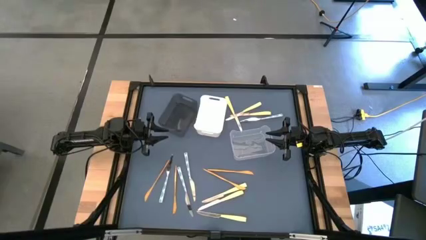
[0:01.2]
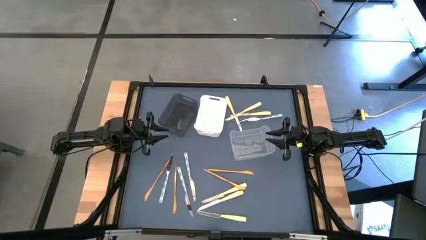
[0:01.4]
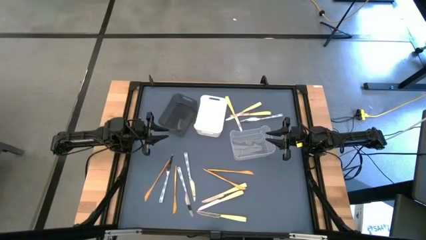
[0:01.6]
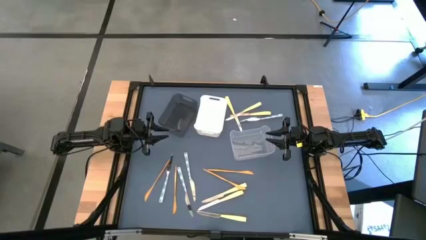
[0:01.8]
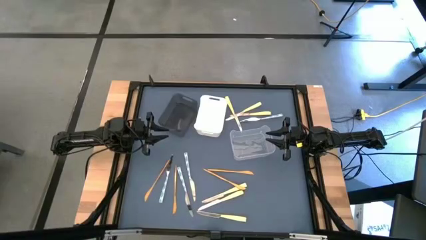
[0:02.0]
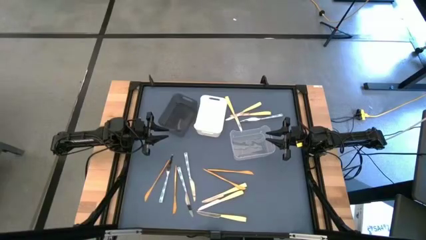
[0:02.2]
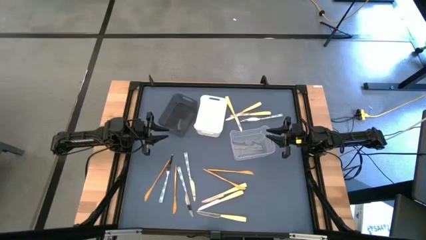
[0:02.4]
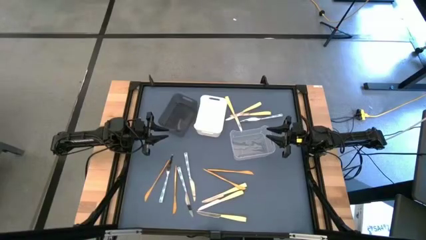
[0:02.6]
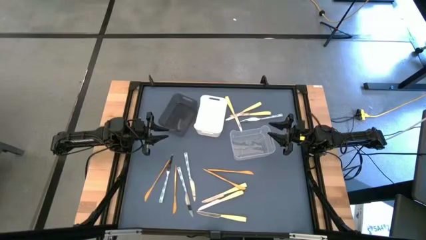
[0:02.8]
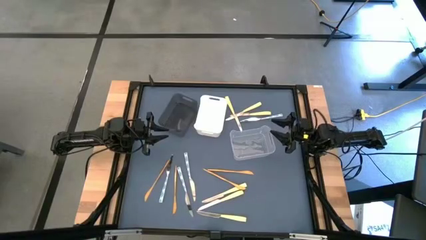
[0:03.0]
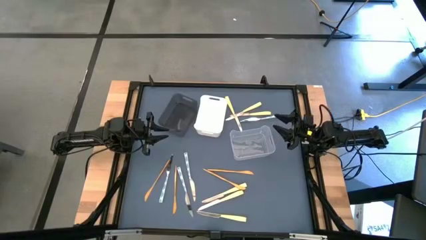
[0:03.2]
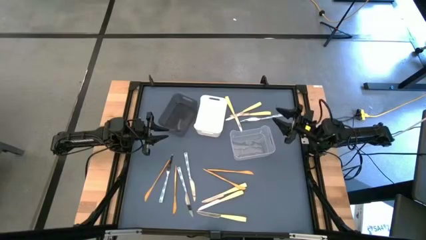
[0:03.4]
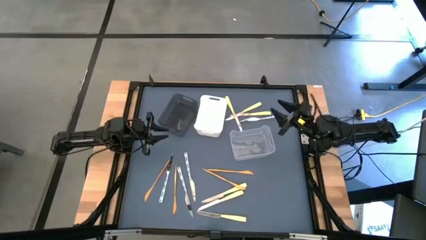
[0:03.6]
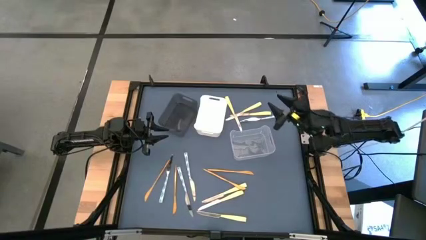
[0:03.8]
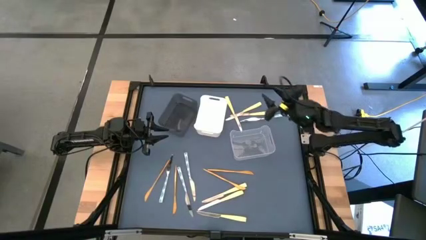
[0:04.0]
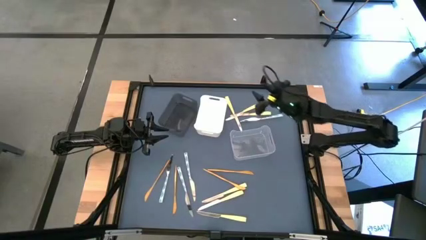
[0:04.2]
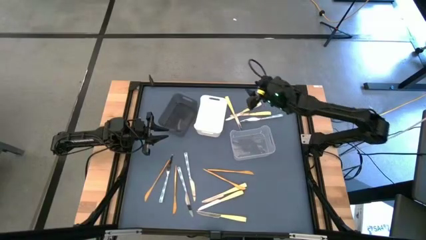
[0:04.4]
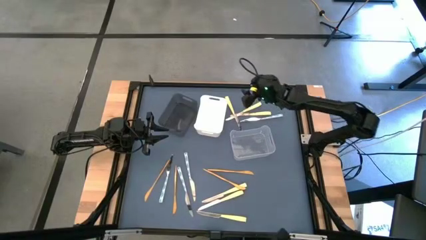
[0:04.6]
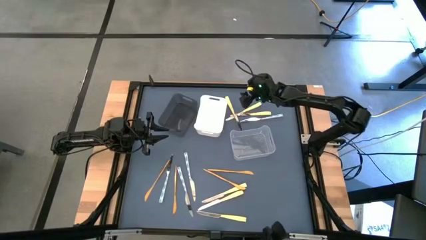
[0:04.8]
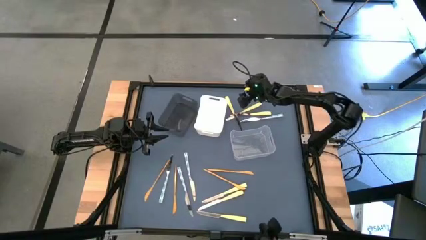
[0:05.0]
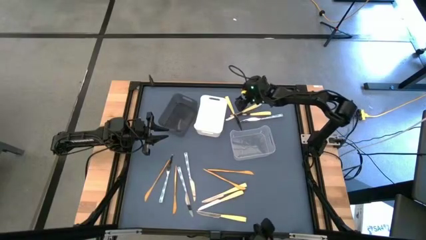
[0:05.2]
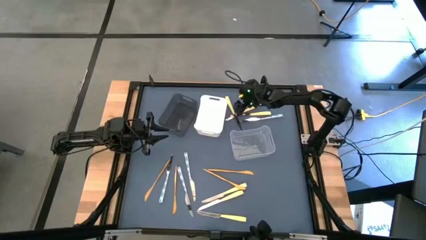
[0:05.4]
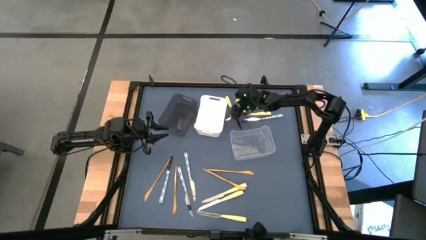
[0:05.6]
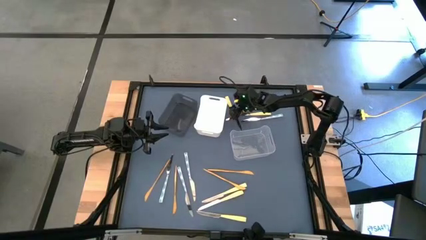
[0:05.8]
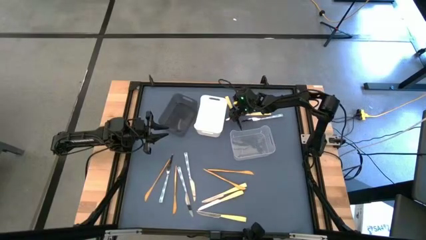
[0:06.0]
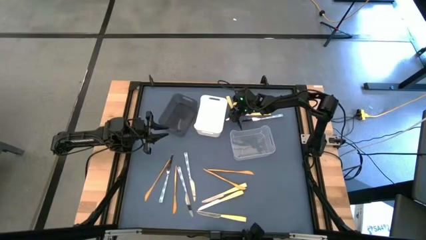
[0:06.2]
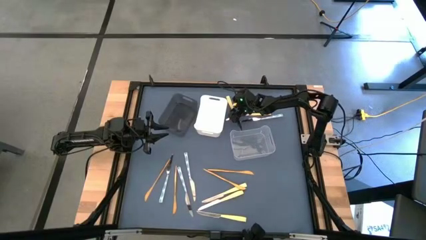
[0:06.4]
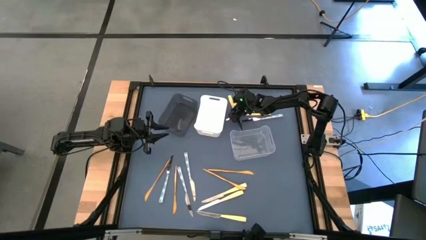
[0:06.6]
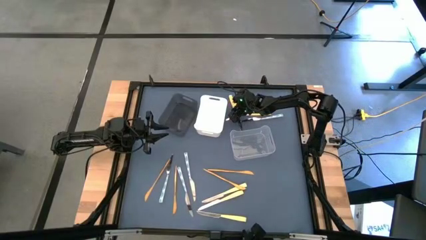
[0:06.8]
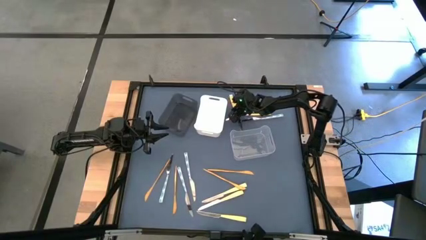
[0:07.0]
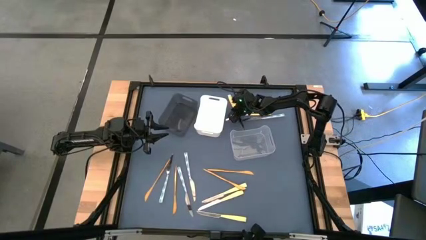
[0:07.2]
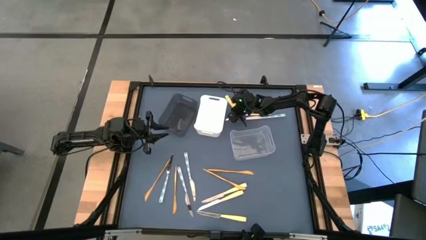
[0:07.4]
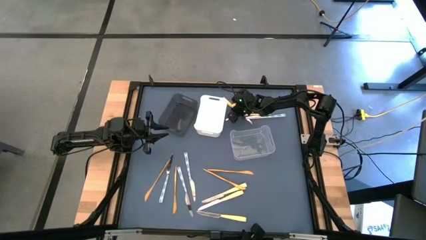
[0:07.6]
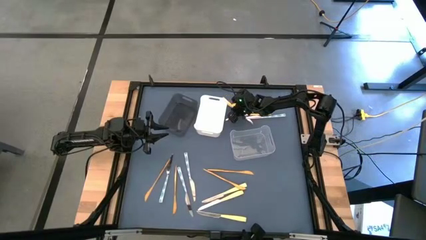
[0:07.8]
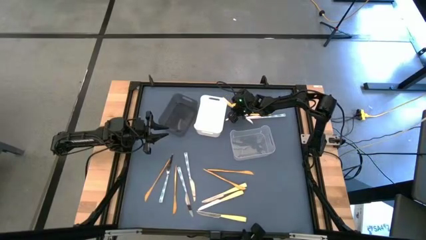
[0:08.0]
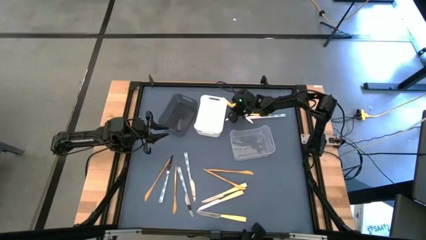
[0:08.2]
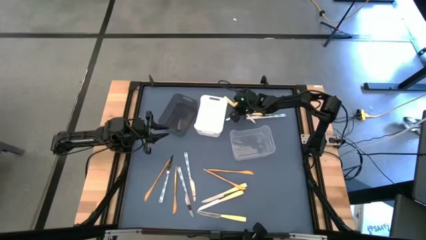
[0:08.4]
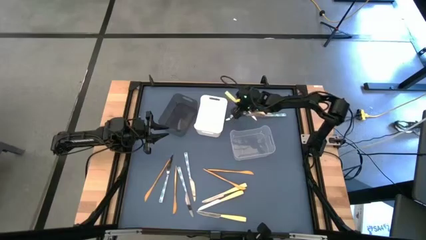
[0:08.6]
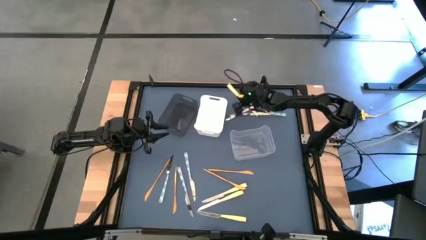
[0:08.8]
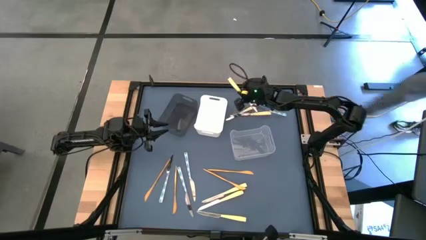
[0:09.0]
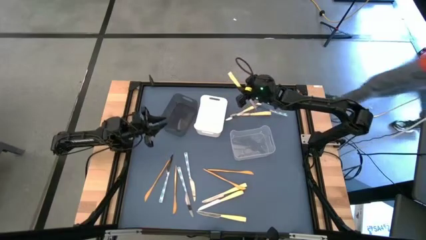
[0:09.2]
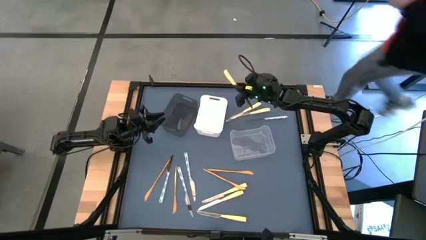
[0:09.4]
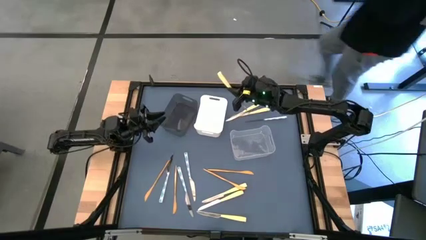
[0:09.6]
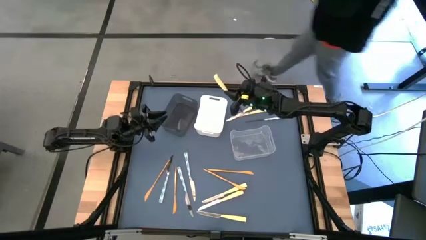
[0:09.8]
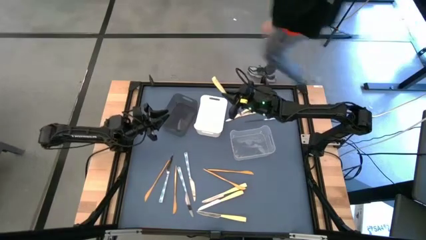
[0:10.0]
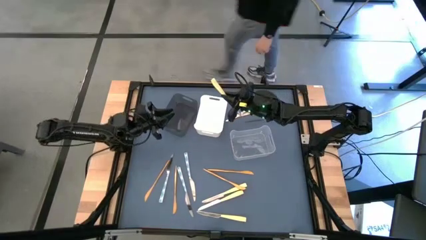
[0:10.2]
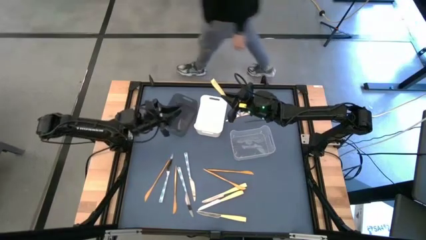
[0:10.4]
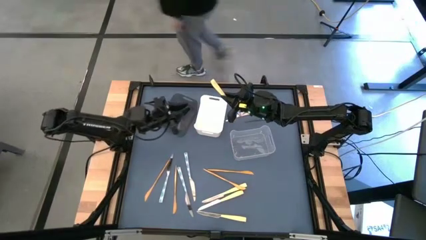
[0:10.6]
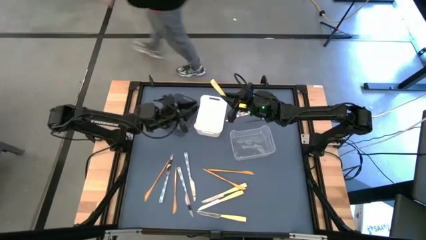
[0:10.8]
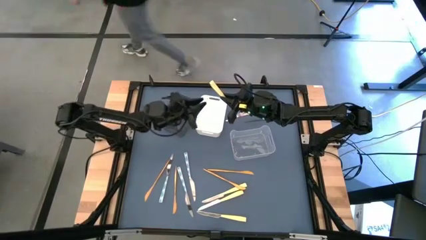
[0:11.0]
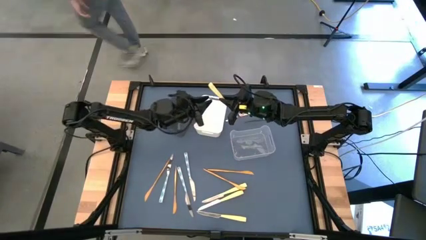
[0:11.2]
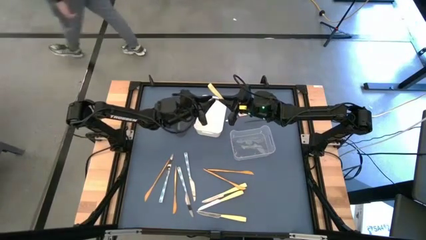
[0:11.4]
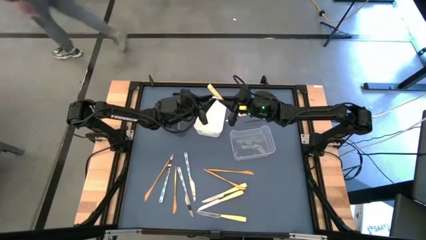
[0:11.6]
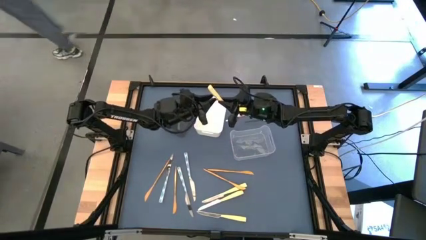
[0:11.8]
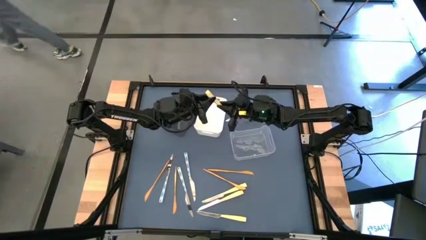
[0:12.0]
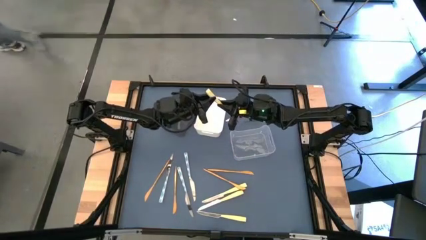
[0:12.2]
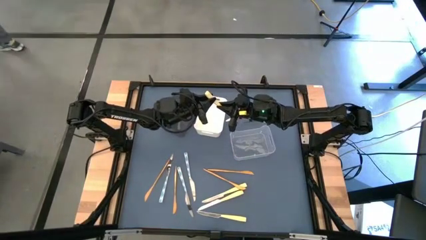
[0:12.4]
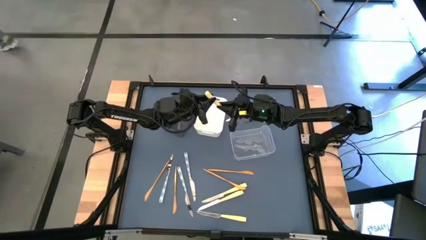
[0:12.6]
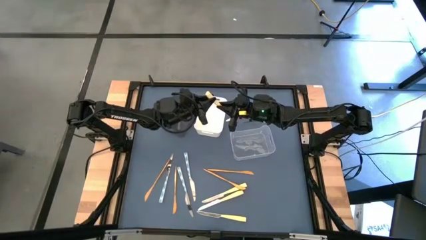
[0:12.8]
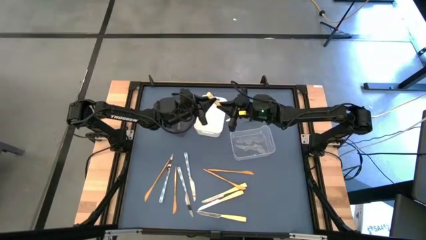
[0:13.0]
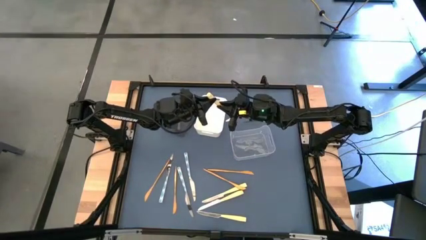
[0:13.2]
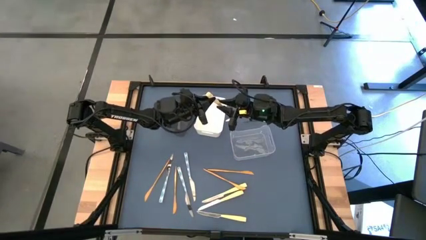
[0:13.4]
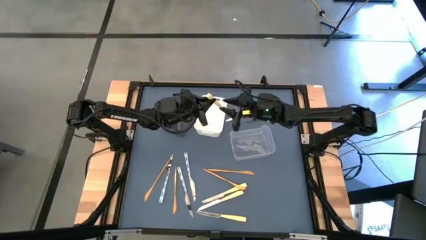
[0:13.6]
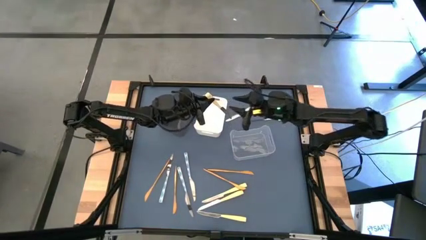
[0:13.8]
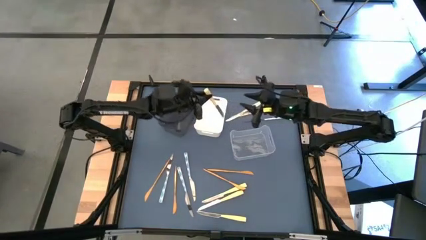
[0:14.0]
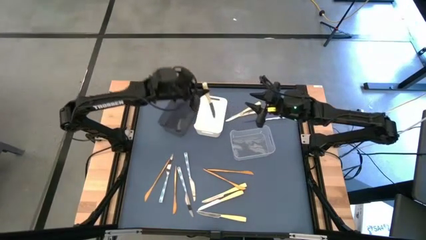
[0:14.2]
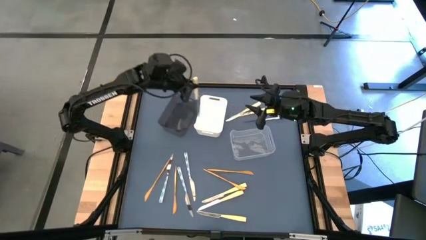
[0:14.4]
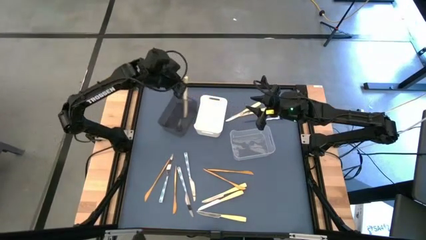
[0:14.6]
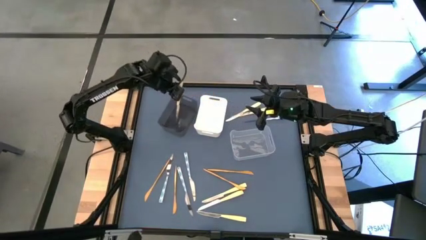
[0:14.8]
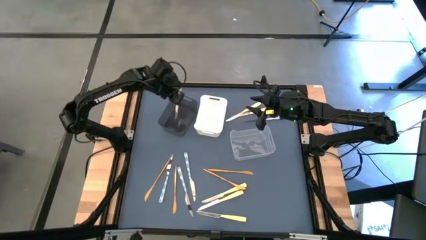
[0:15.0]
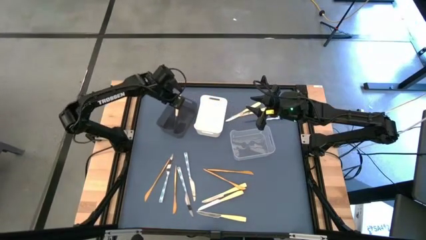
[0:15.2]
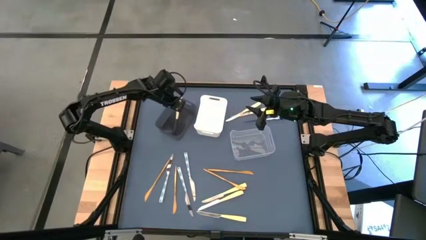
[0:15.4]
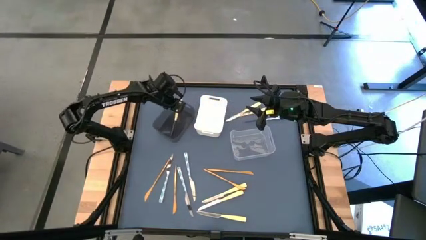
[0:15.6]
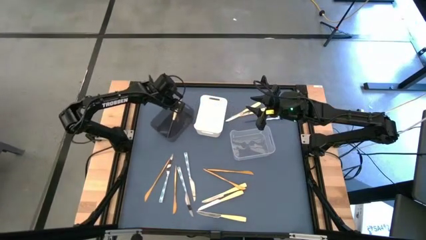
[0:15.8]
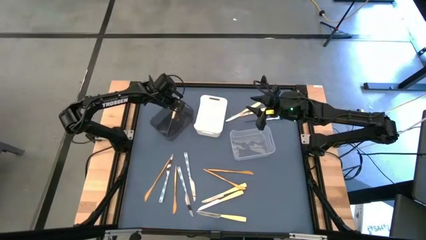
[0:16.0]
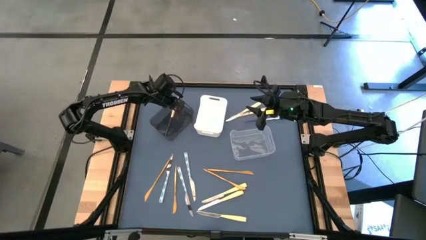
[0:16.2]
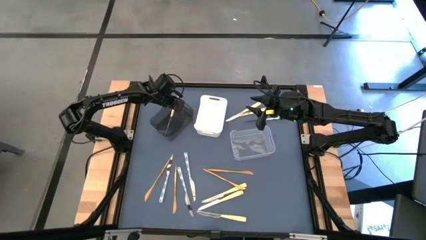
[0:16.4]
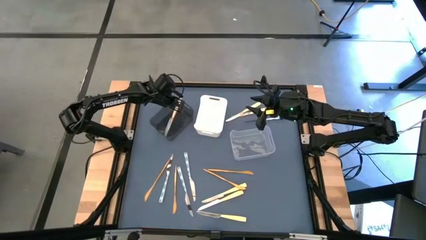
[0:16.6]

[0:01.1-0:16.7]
Task: Sort silverware by color (type)
Put the yellow knife into the black bin
